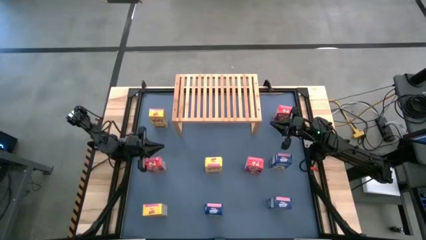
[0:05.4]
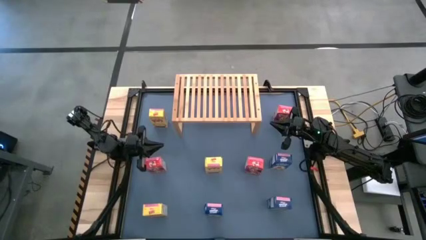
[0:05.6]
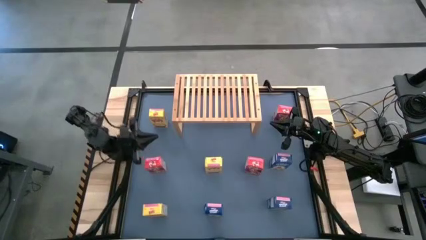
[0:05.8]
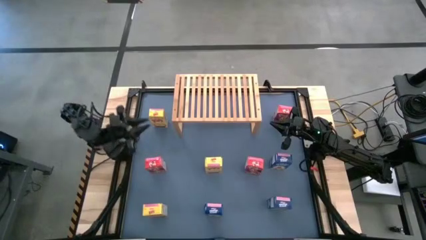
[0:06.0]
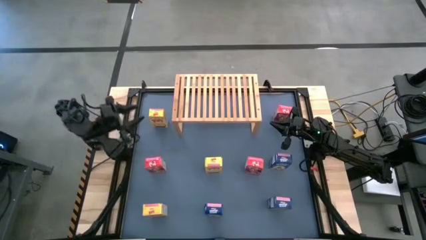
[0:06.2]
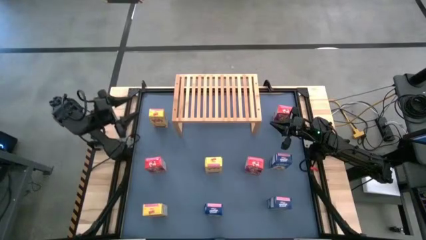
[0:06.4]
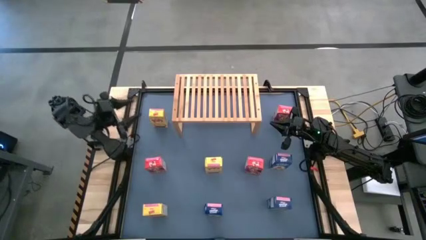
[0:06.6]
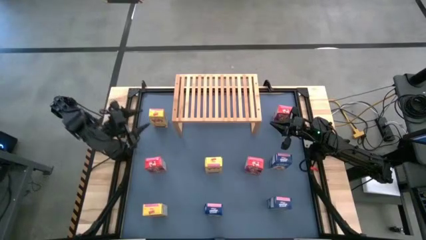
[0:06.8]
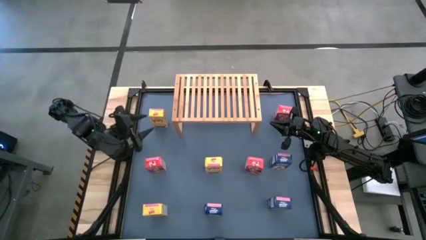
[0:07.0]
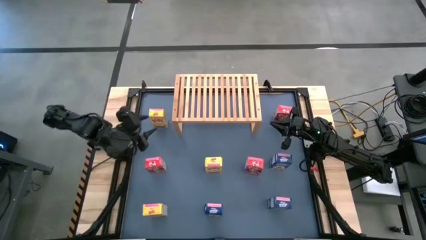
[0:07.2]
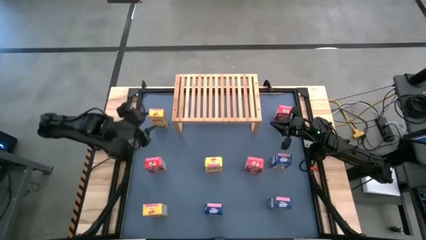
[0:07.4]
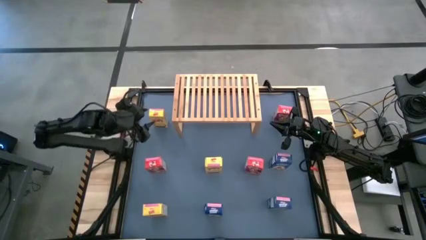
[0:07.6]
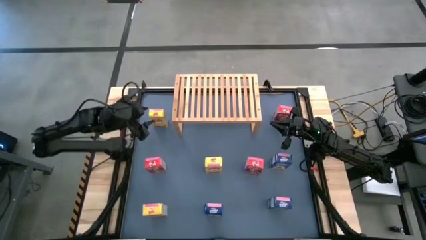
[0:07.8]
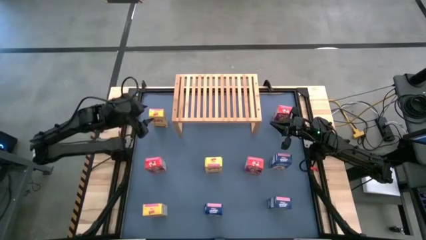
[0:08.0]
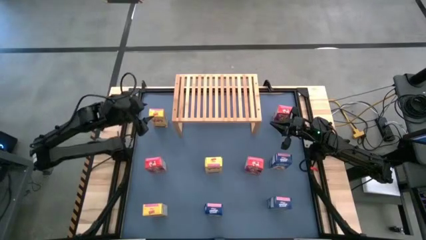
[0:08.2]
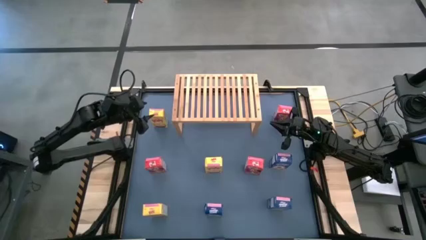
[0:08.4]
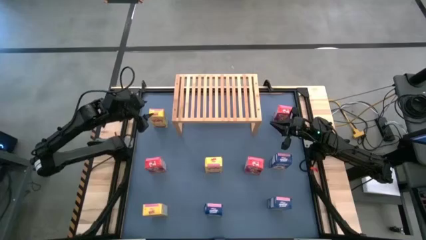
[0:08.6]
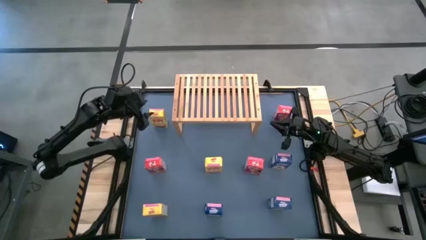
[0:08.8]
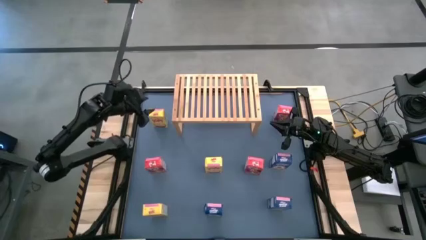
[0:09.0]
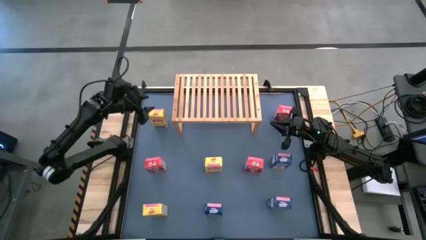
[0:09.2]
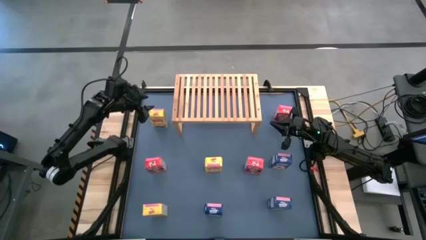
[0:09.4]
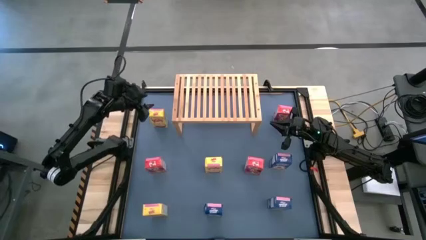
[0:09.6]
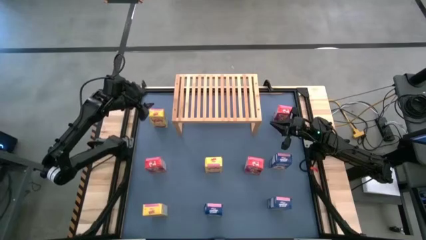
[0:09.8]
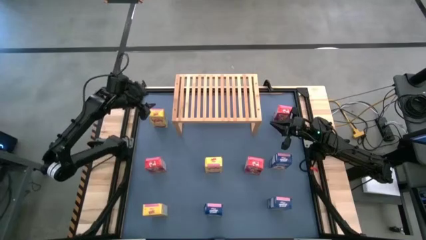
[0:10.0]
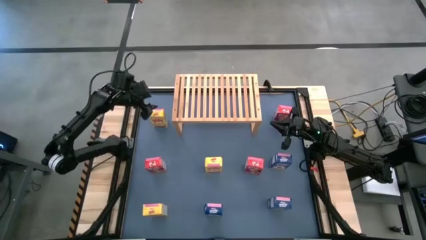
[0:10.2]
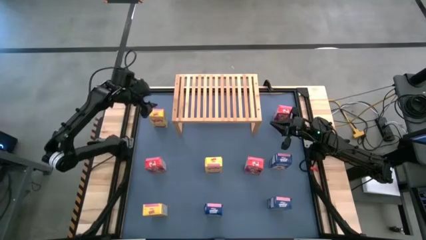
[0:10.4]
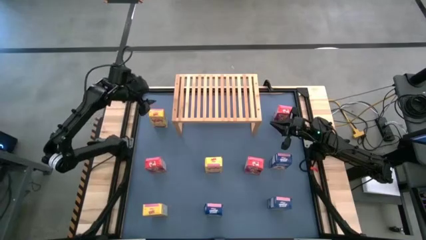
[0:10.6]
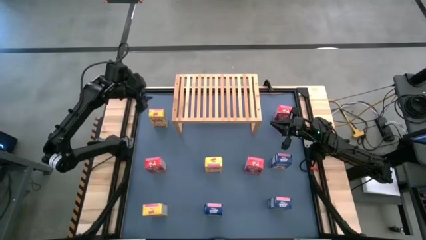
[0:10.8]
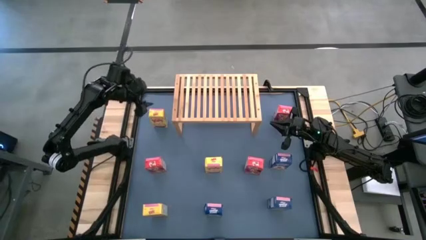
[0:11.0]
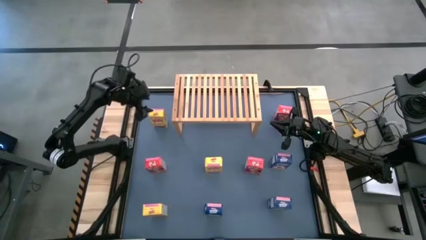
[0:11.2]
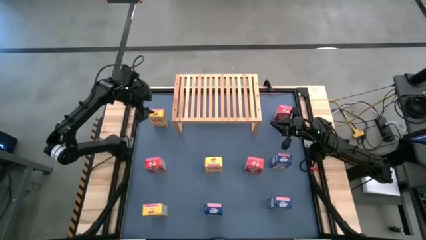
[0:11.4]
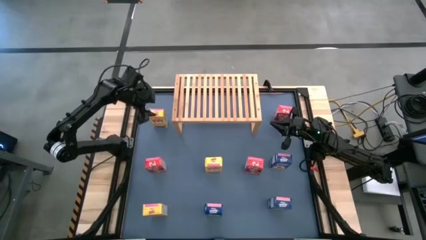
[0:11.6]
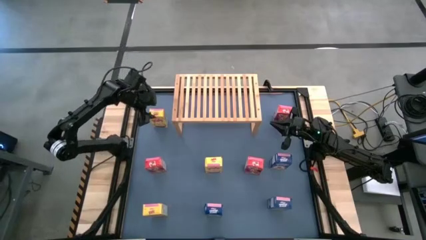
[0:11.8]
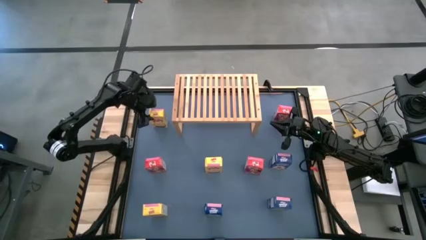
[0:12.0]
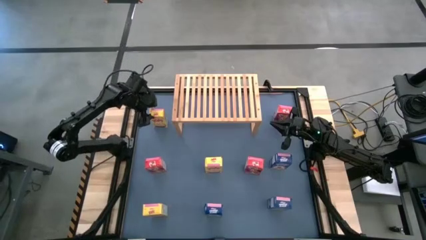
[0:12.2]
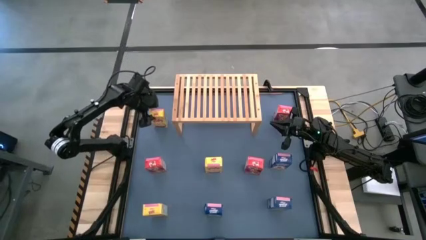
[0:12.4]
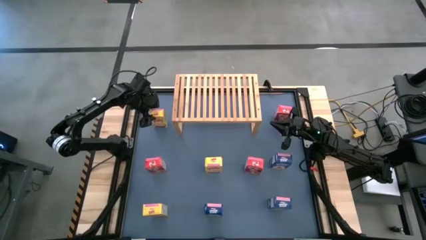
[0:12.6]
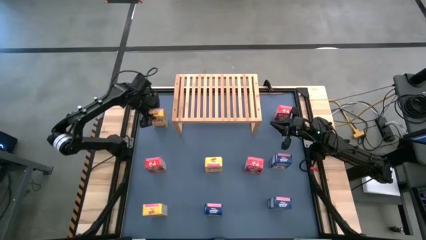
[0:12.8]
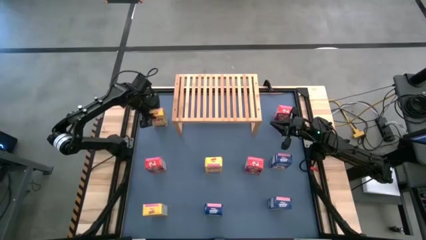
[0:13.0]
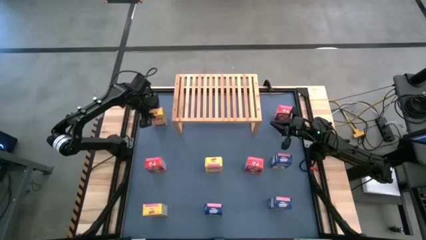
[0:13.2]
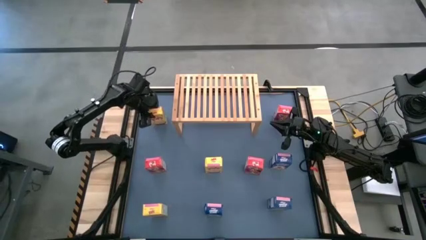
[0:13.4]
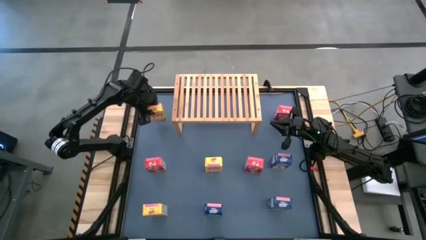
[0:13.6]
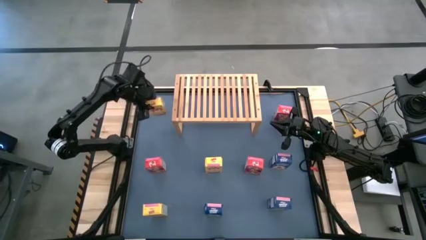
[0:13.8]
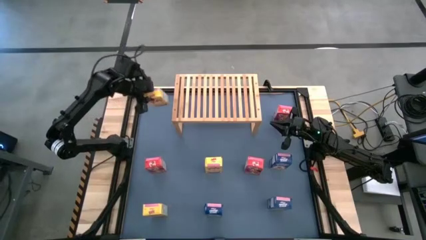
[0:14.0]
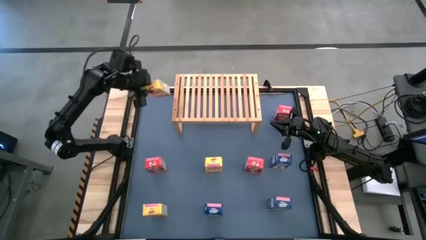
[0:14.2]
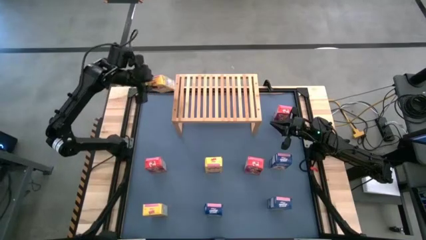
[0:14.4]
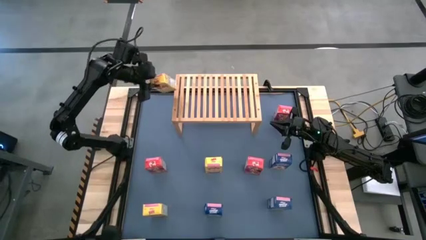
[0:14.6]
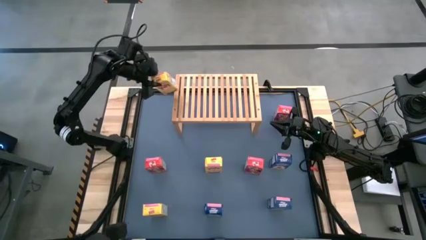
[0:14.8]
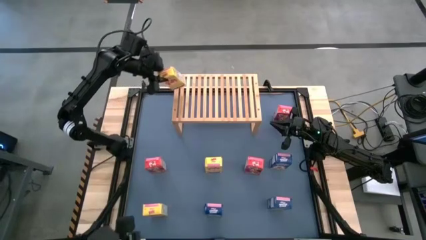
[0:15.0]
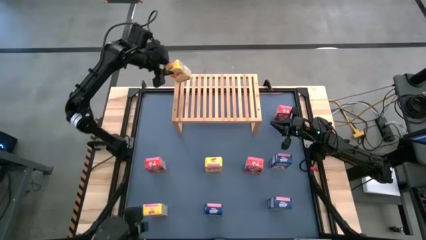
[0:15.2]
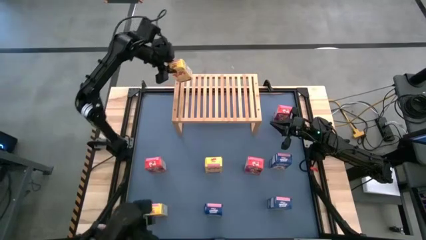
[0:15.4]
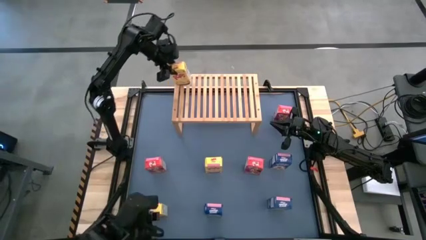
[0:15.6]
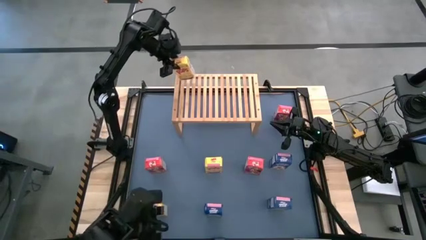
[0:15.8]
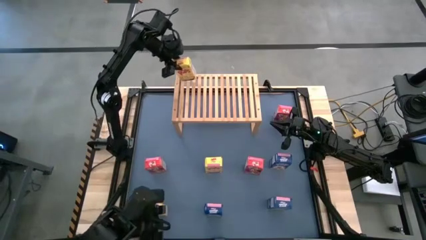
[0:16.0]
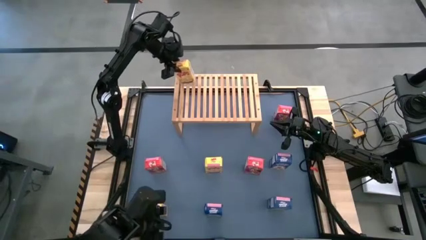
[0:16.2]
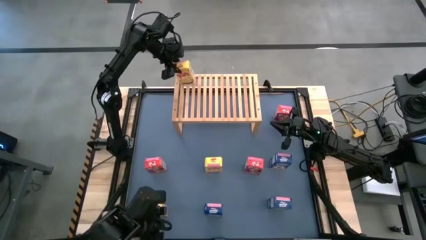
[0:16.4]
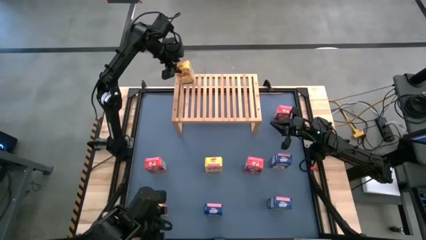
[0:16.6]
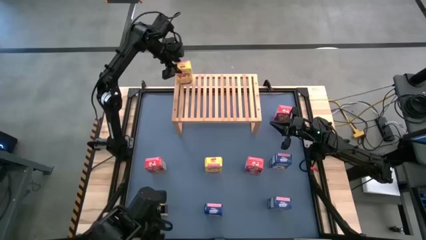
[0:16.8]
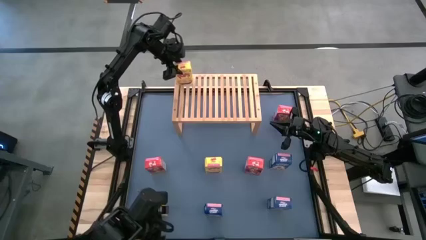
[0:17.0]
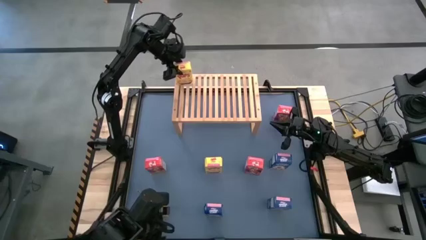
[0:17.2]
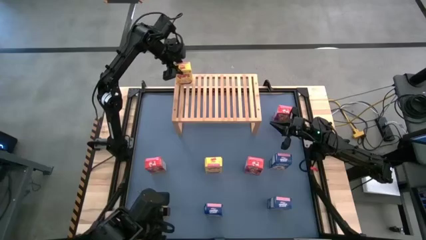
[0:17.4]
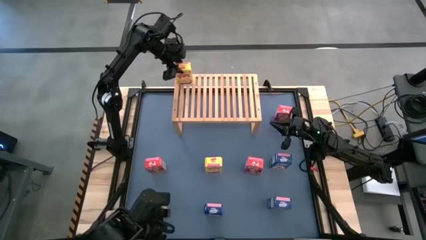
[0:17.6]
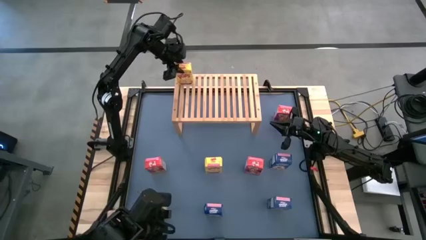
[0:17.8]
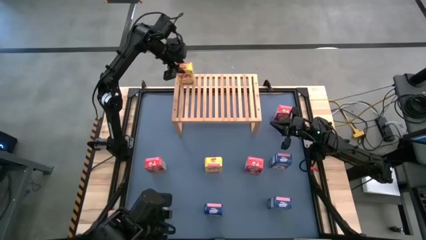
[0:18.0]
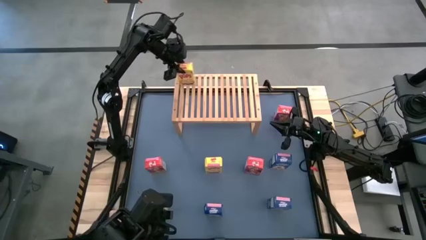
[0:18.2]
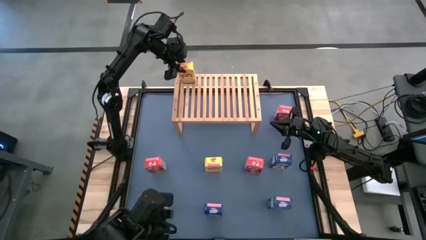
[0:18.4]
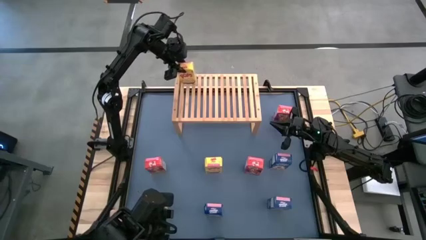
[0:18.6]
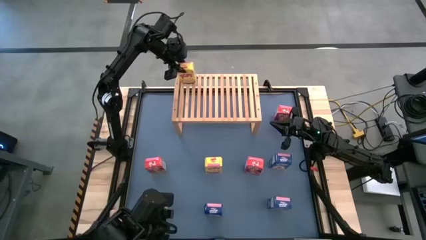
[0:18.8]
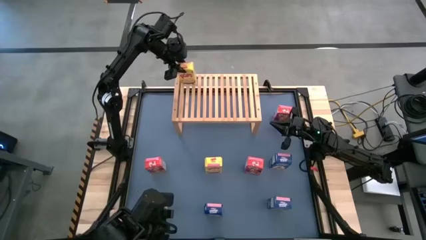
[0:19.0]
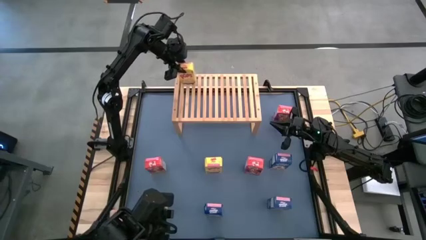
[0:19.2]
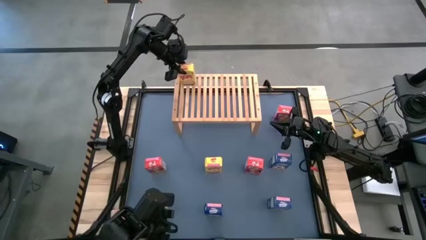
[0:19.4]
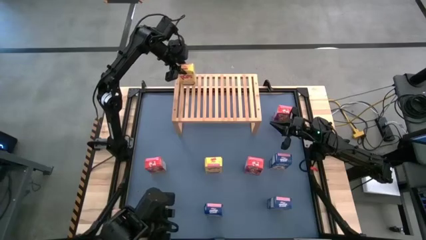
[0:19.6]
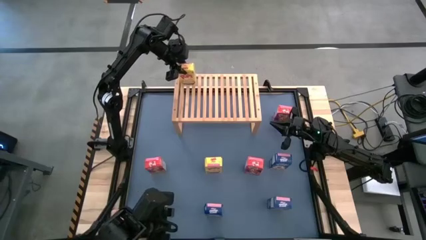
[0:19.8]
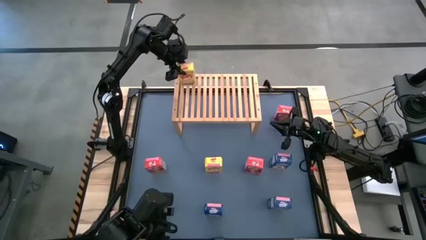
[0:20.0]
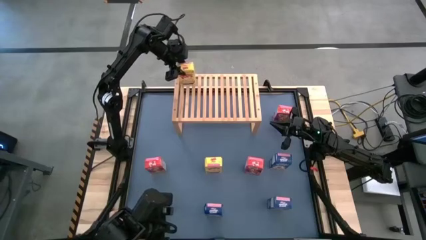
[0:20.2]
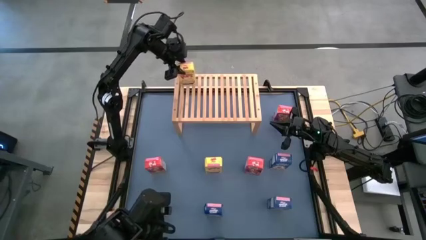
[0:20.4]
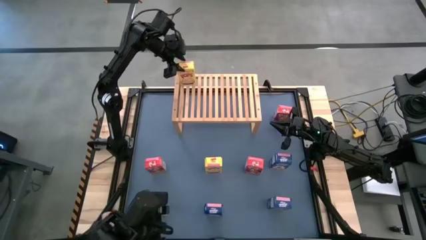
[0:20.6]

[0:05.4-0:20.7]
Task: Stack cereal on shelf
Put the top left yellow cereal box on the shelf
